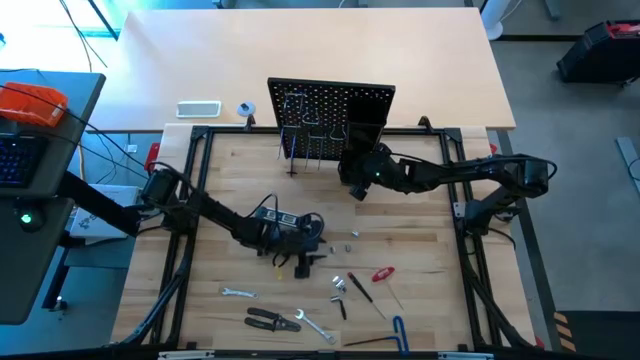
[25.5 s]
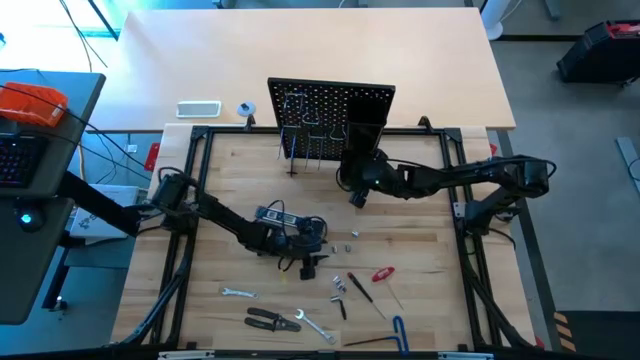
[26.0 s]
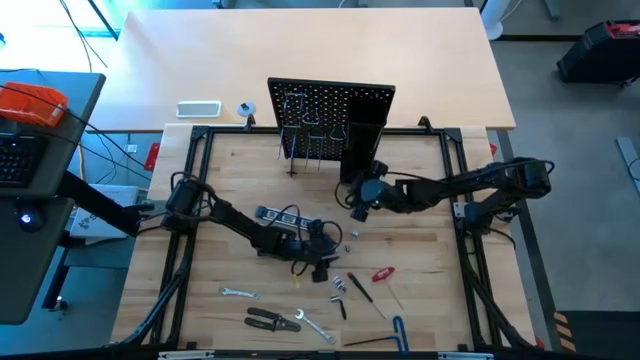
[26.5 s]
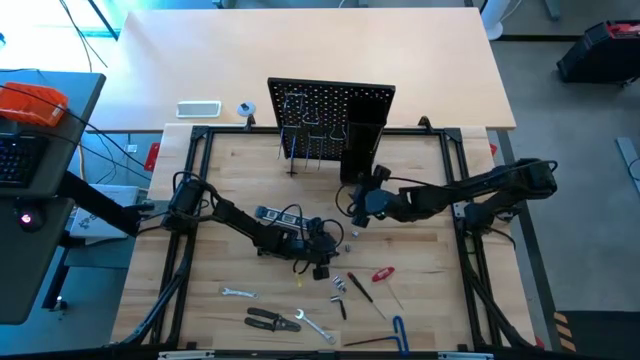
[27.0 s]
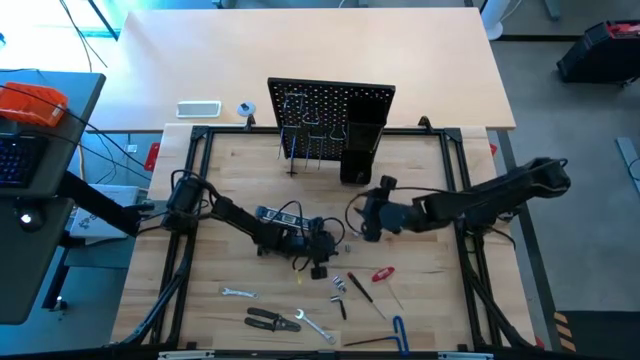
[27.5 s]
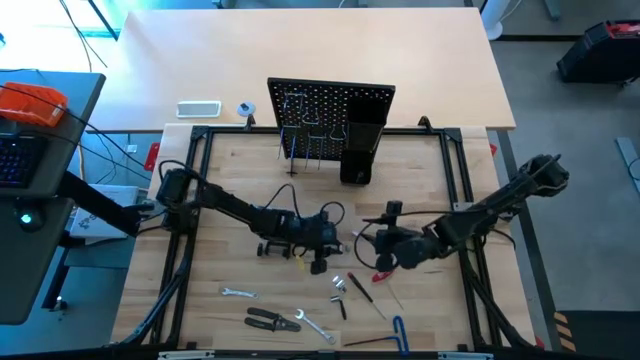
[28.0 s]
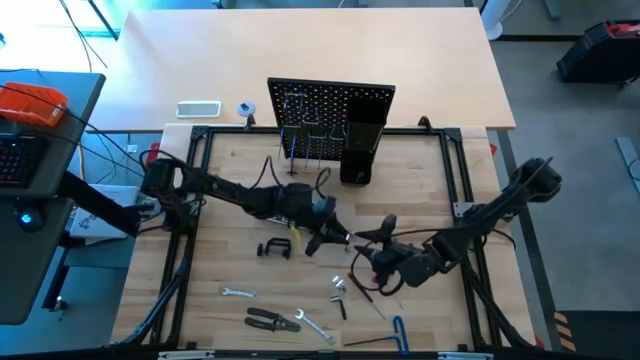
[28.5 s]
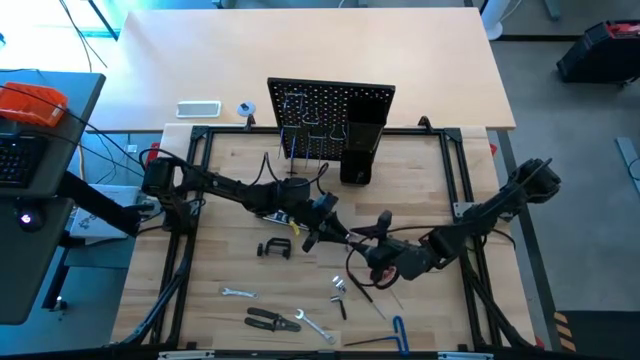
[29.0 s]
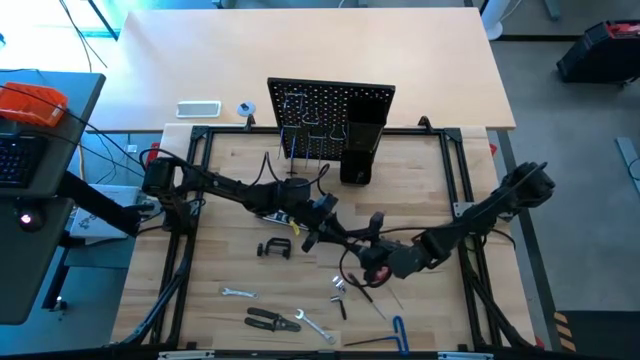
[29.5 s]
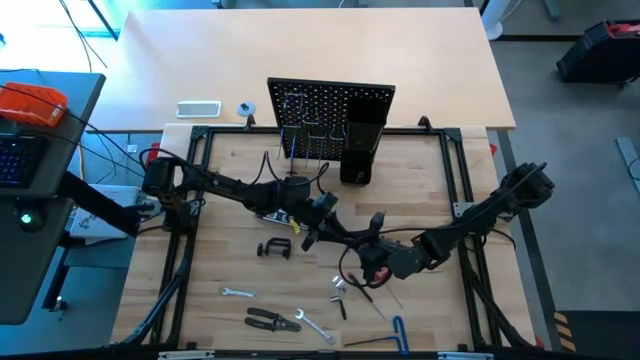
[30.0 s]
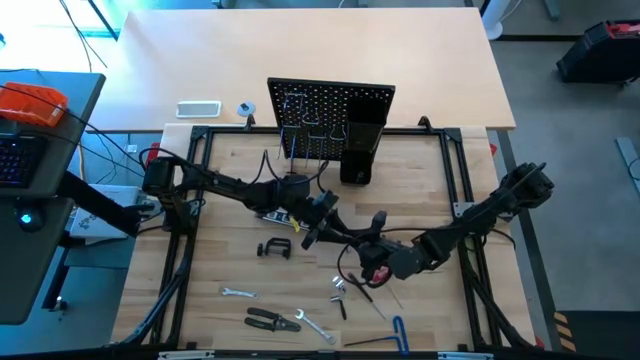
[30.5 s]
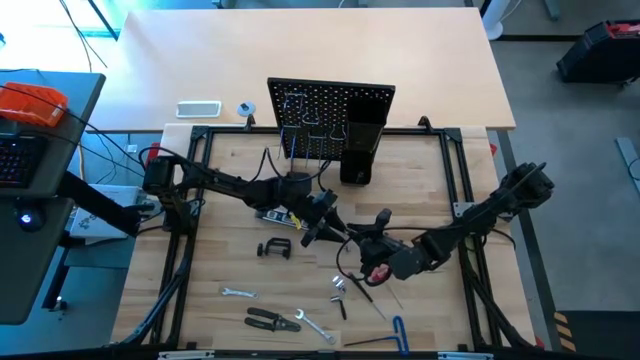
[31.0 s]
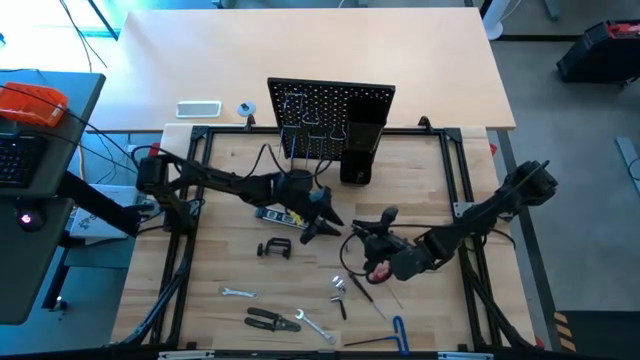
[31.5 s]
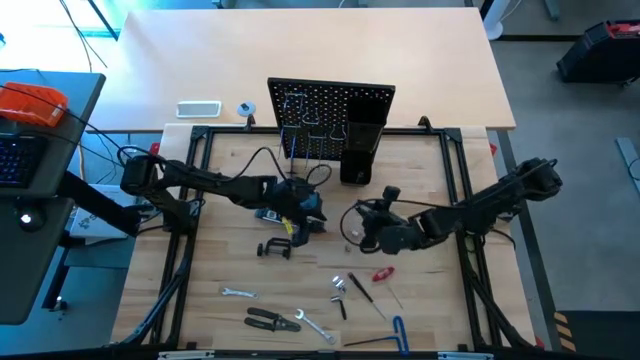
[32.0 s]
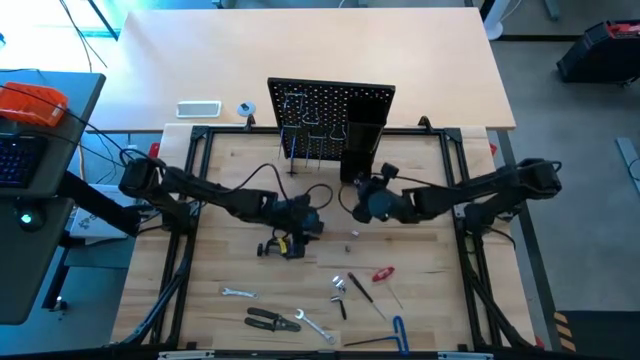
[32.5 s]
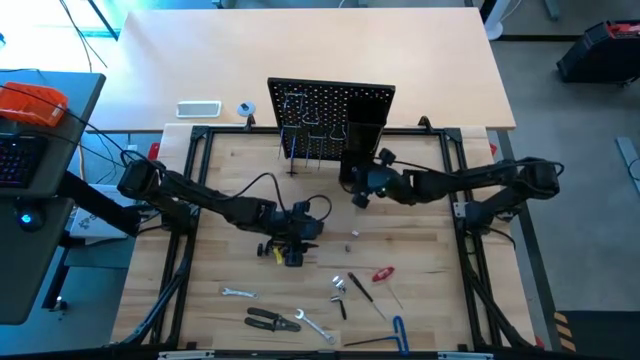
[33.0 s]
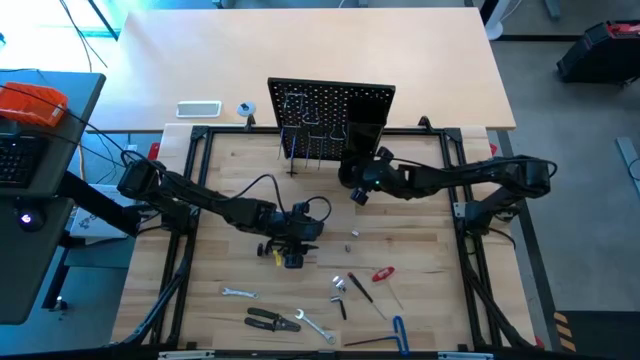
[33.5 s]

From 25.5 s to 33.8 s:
Task: Hang tools onto peg board
Put the top center socket into the bottom peg board bin

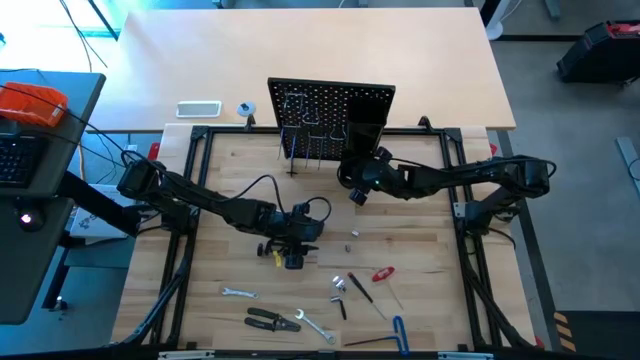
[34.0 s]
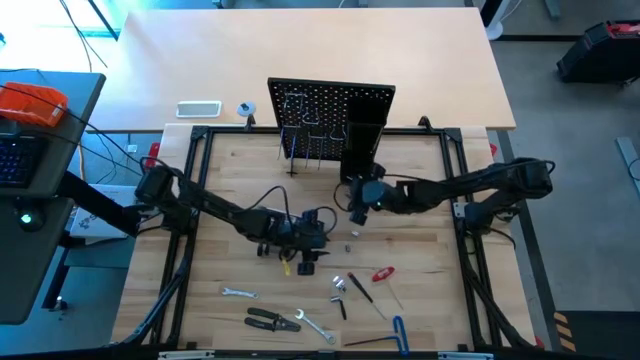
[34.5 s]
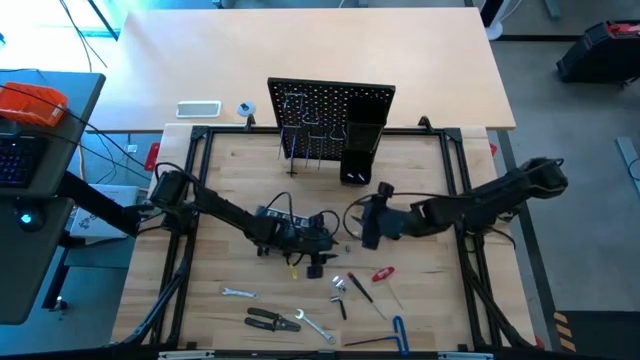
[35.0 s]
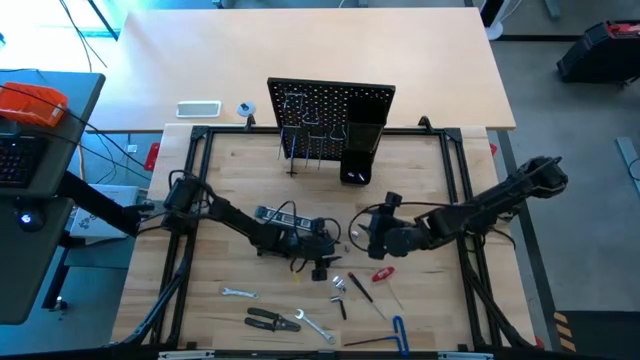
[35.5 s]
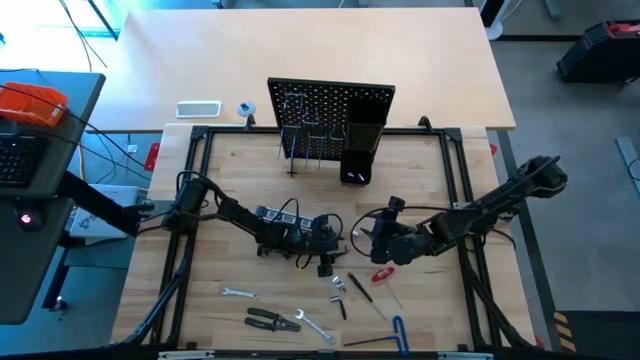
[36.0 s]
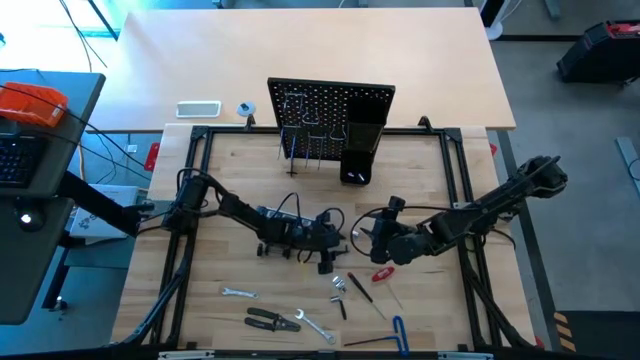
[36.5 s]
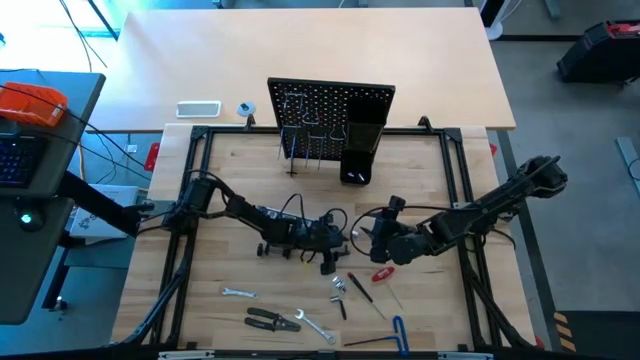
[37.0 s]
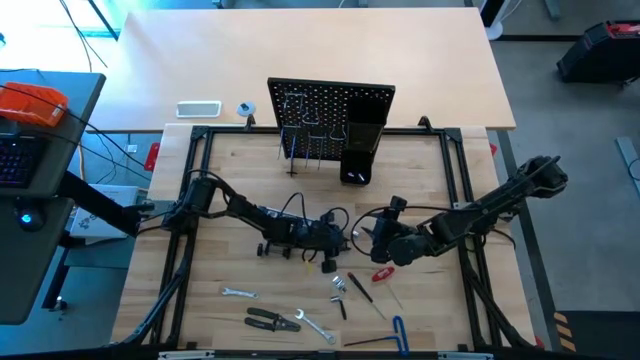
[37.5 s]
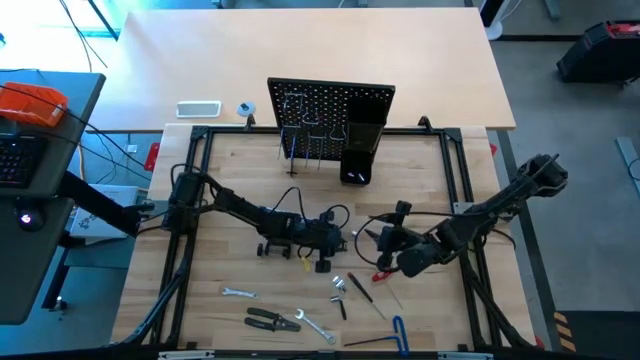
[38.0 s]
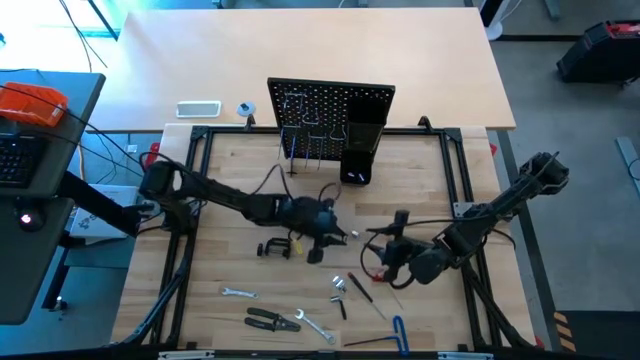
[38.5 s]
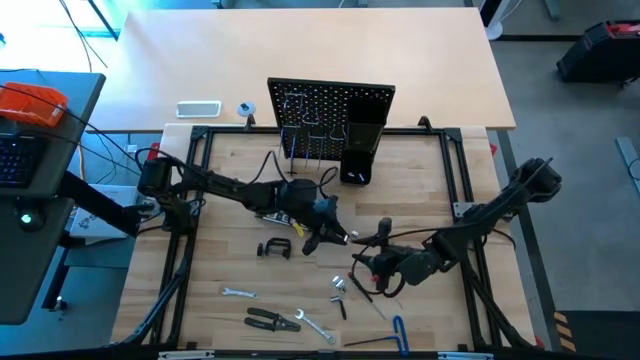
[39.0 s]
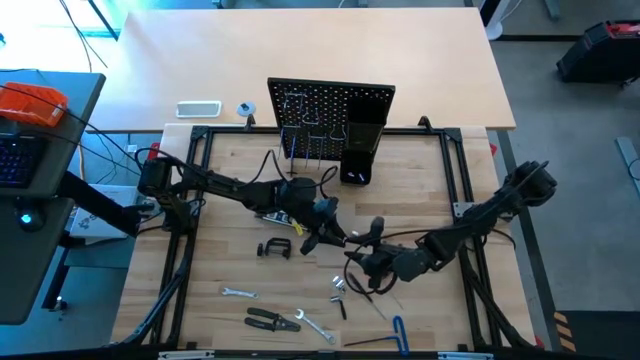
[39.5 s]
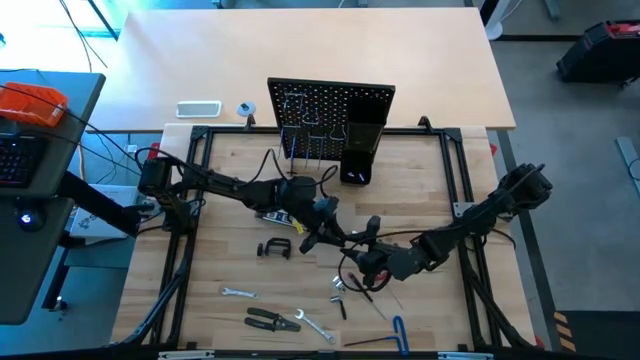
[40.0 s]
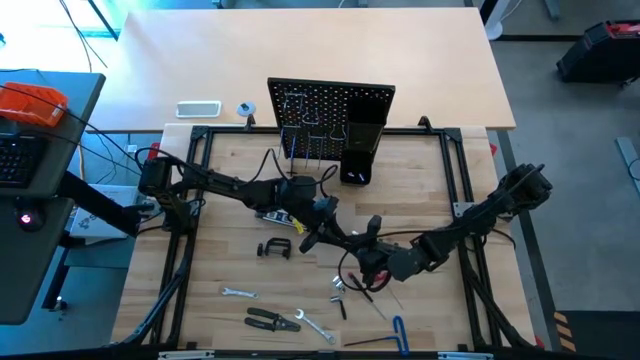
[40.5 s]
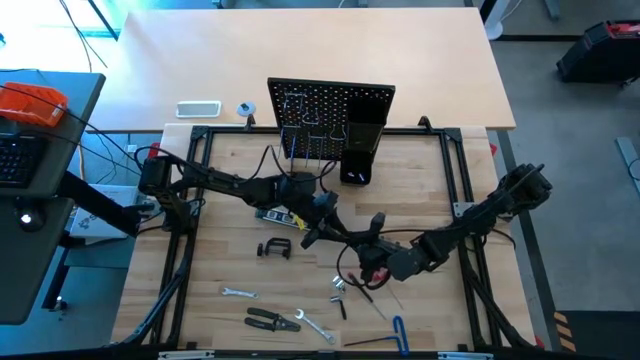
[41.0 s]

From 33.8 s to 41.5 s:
Put the top right socket into the bottom peg board bin

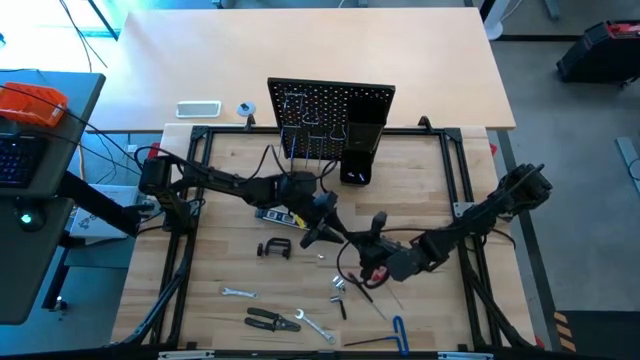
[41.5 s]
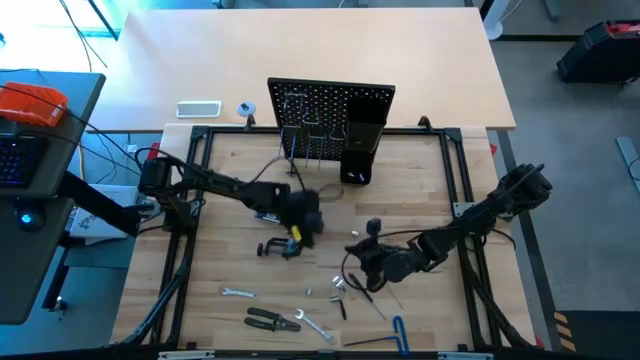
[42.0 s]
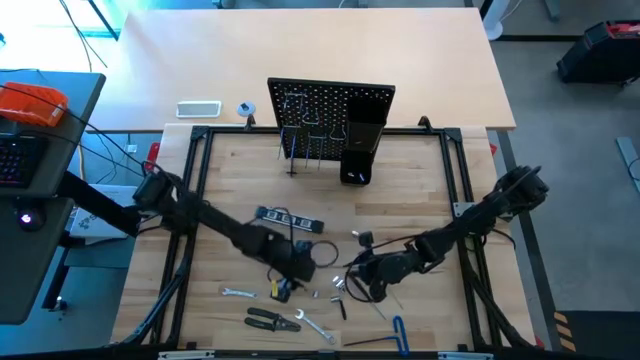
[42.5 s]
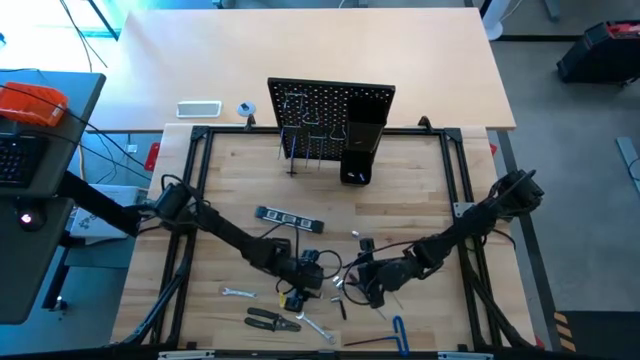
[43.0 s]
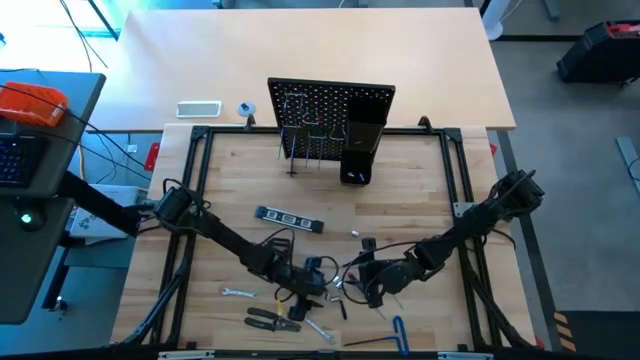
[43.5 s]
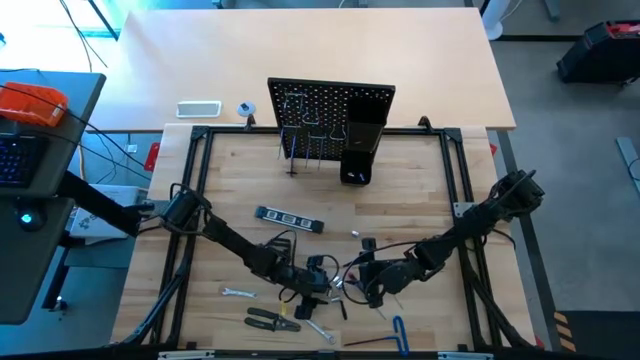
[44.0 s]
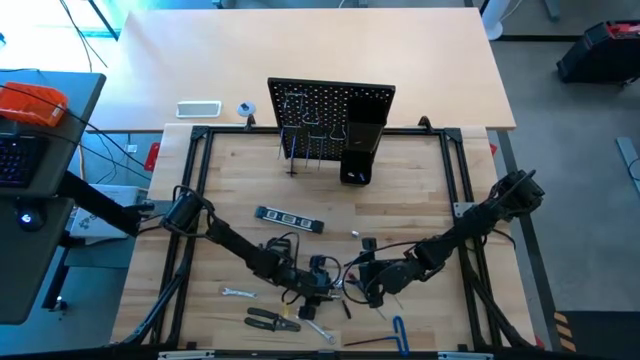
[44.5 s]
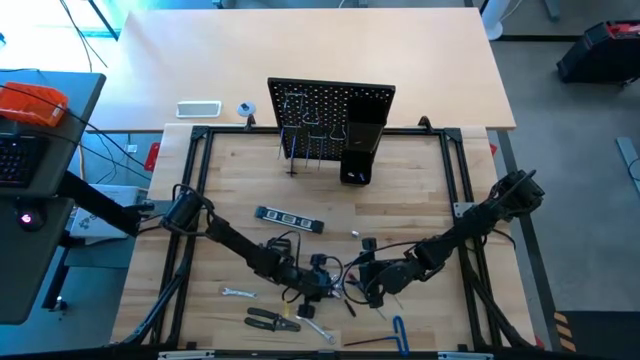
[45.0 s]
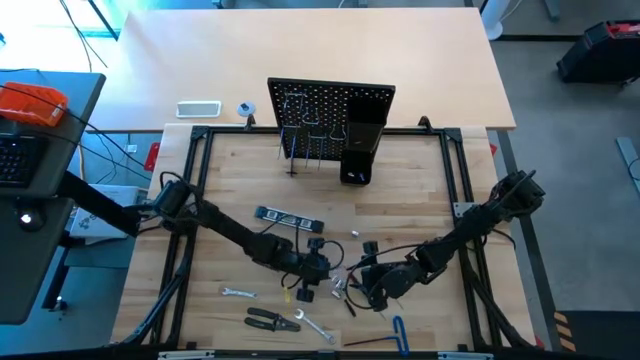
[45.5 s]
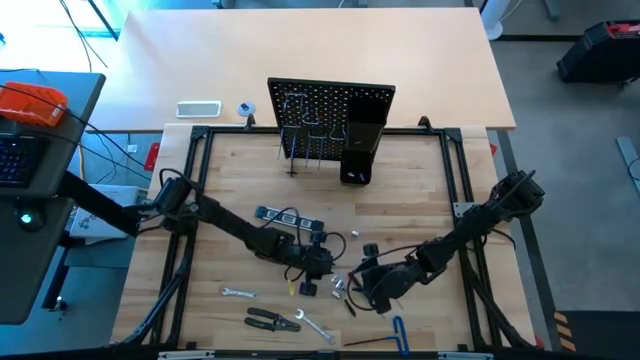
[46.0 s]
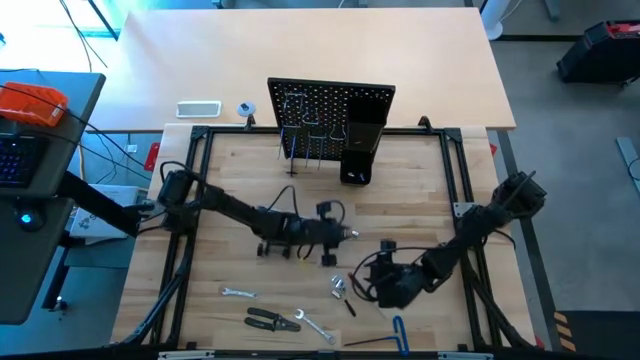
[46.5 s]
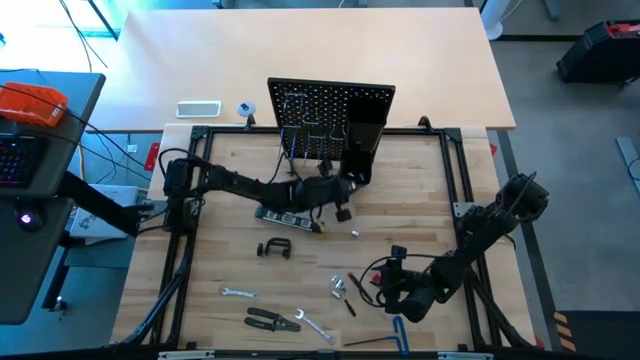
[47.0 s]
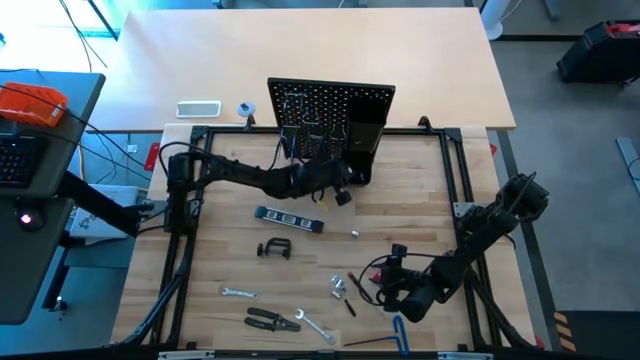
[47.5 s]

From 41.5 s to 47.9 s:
Put the top right socket into the bottom peg board bin
